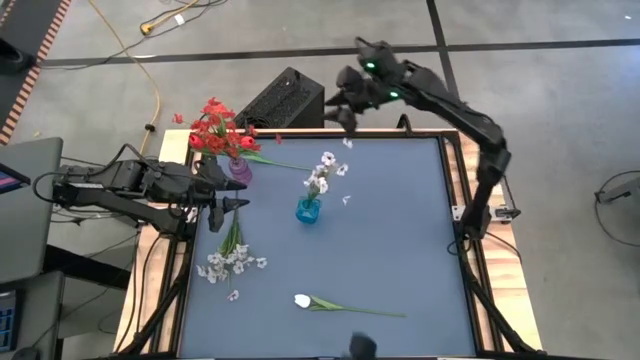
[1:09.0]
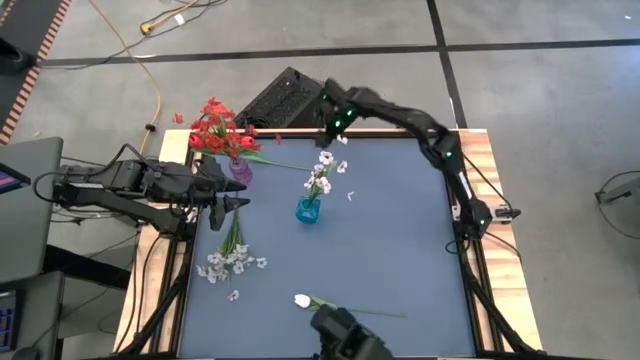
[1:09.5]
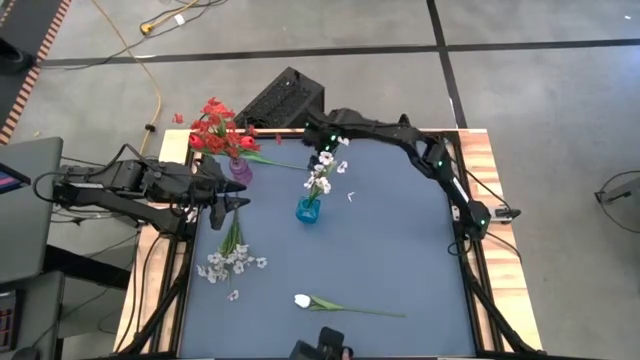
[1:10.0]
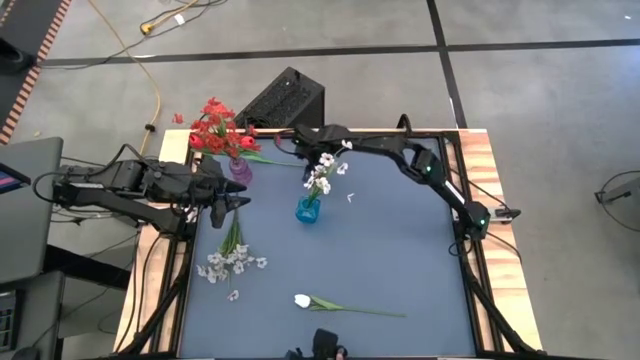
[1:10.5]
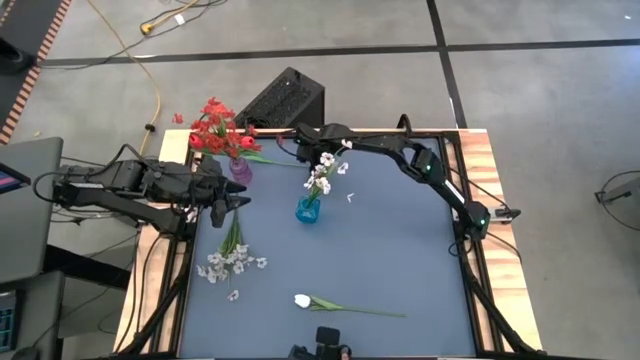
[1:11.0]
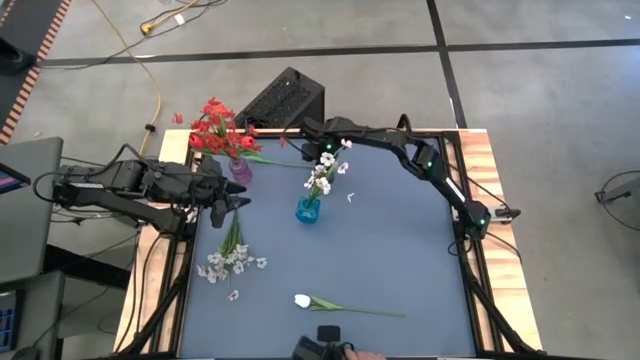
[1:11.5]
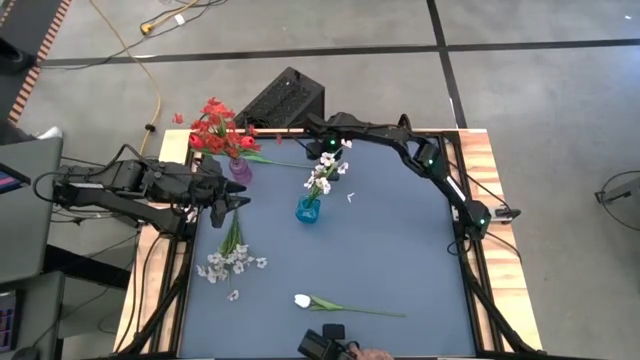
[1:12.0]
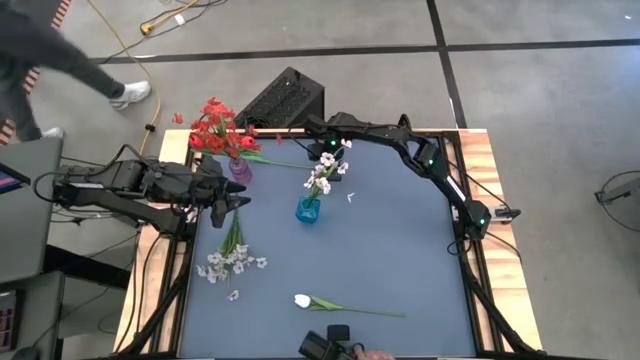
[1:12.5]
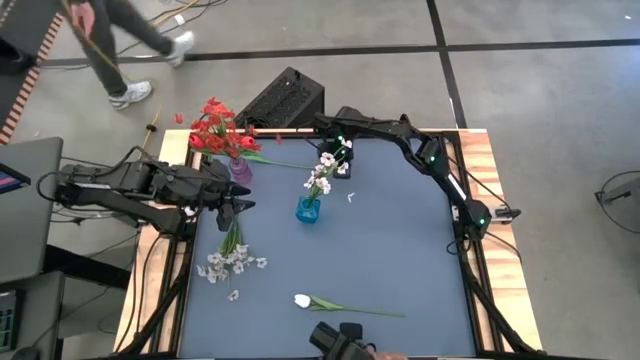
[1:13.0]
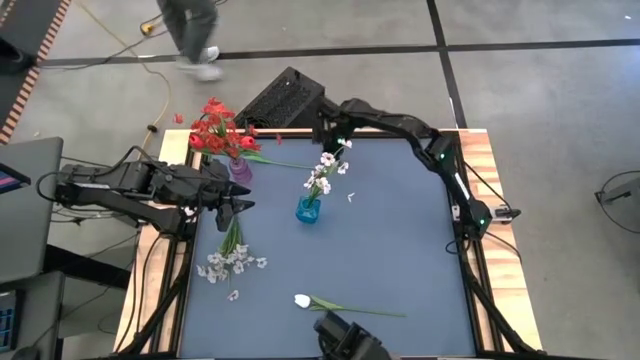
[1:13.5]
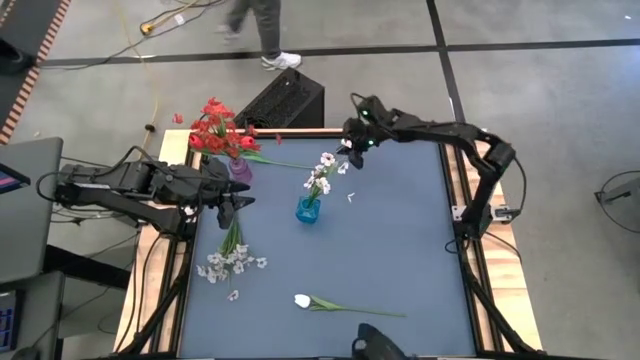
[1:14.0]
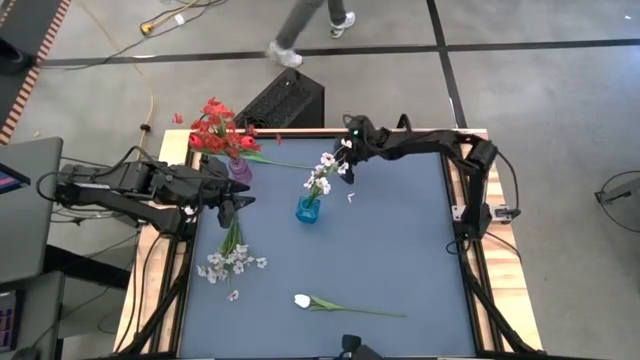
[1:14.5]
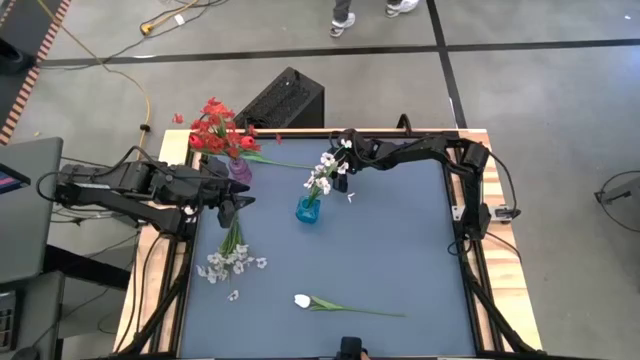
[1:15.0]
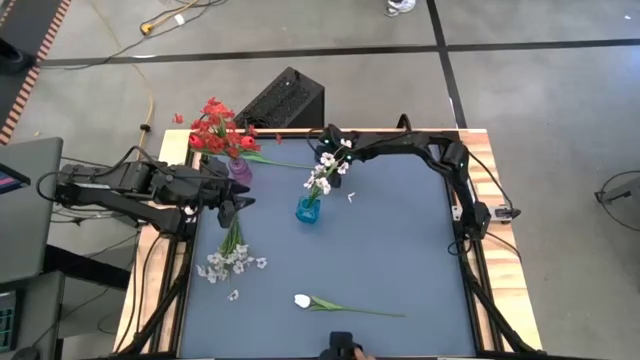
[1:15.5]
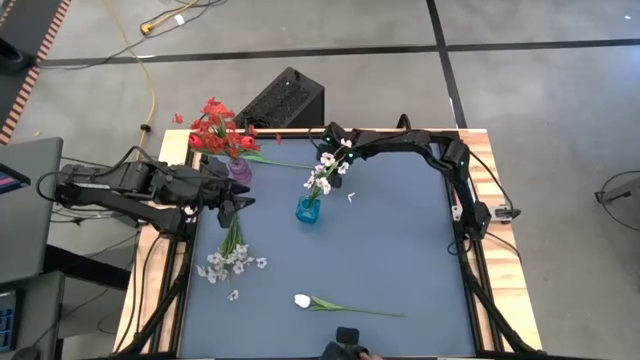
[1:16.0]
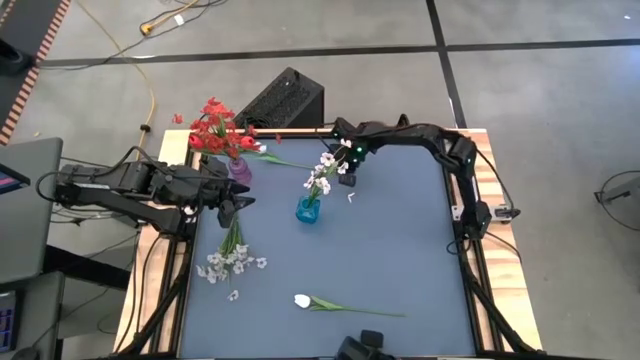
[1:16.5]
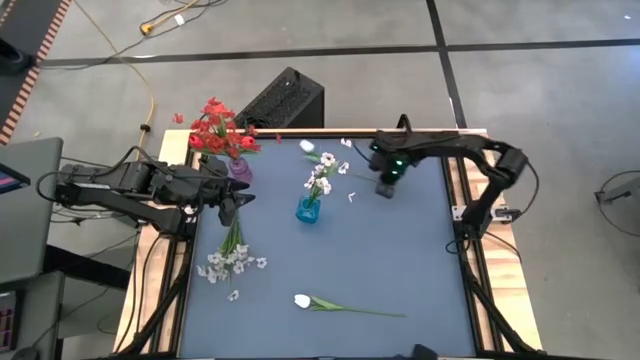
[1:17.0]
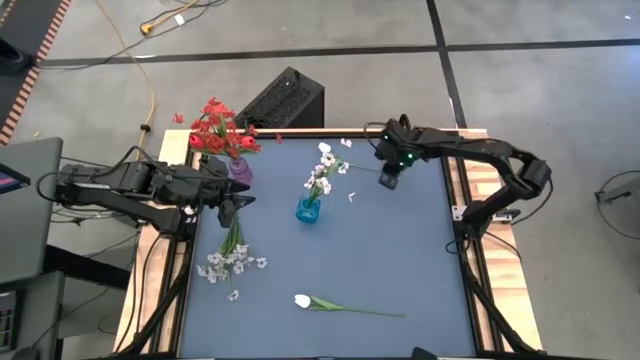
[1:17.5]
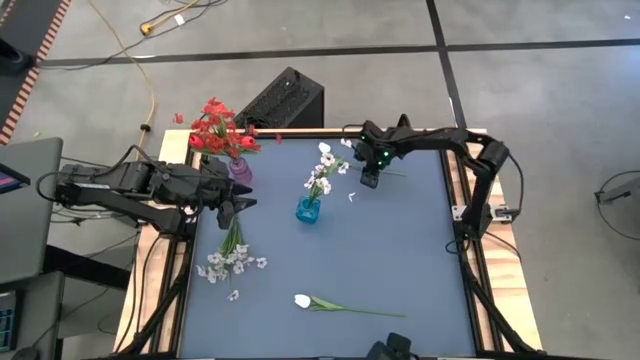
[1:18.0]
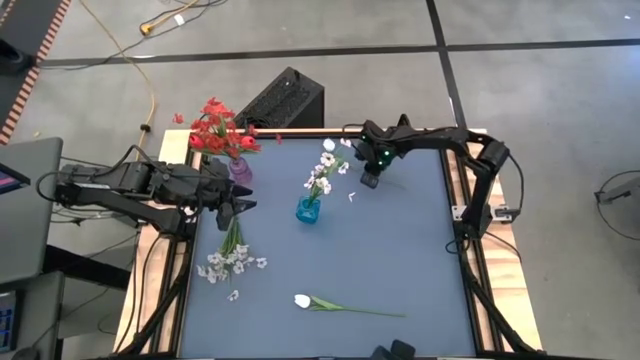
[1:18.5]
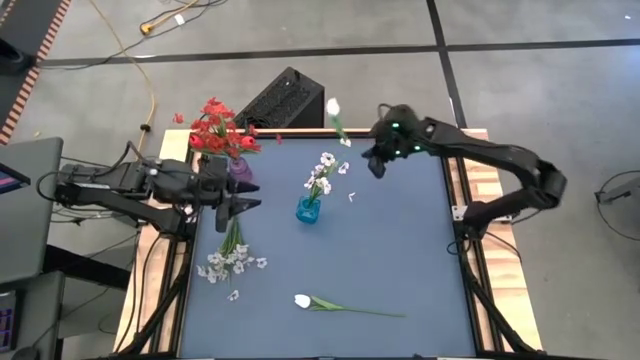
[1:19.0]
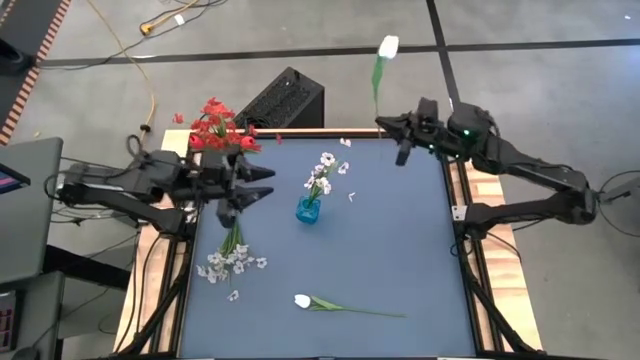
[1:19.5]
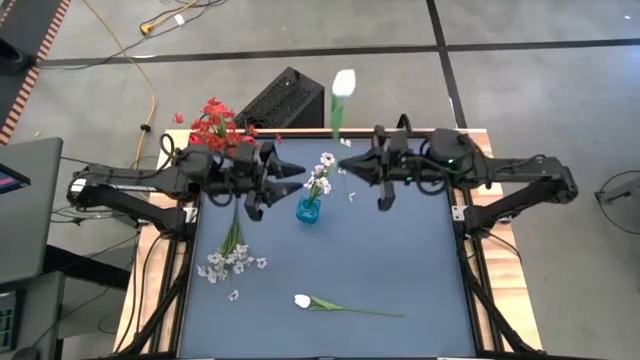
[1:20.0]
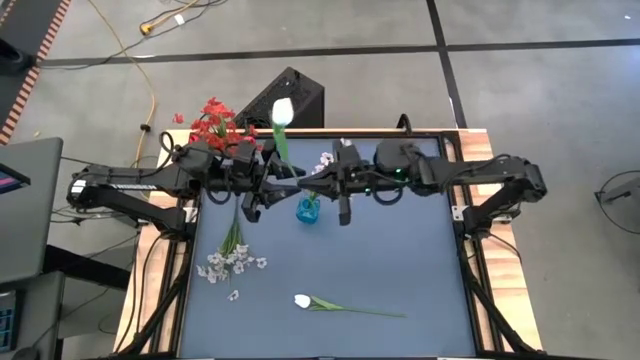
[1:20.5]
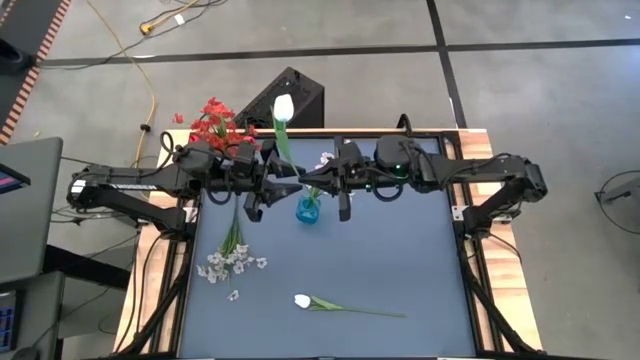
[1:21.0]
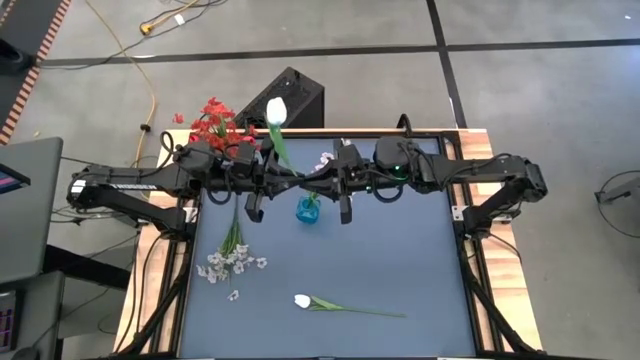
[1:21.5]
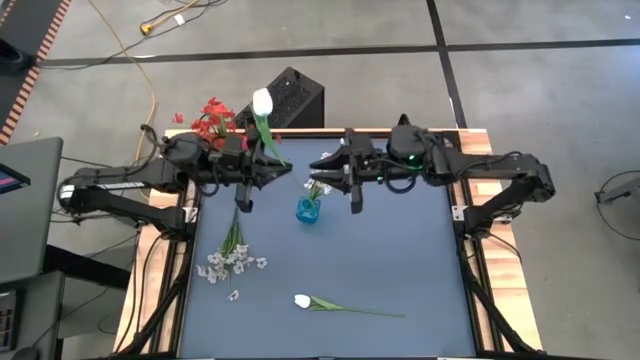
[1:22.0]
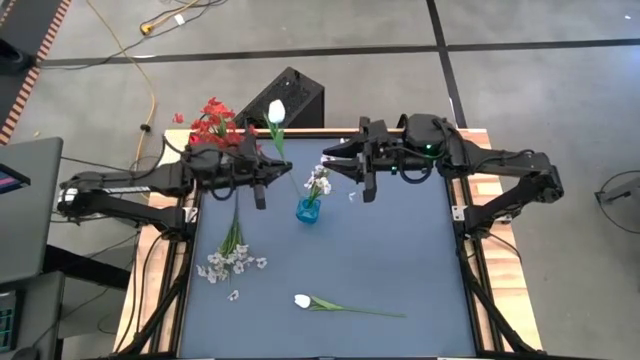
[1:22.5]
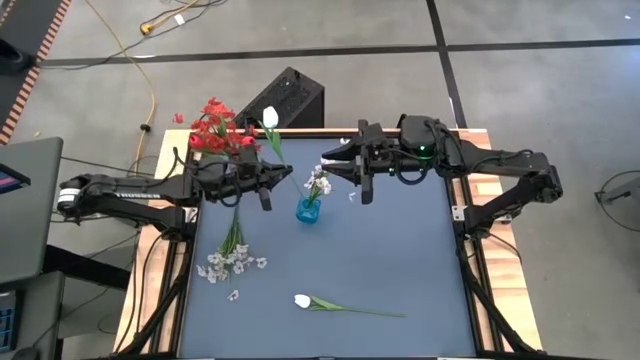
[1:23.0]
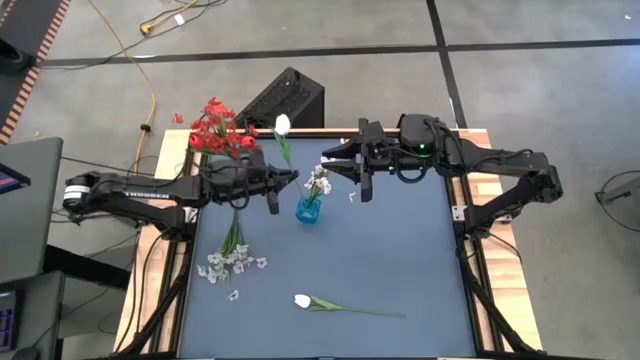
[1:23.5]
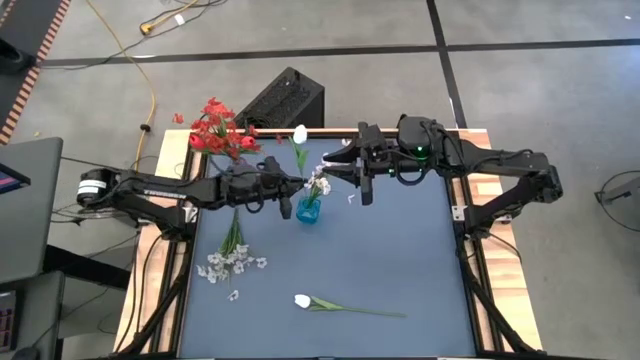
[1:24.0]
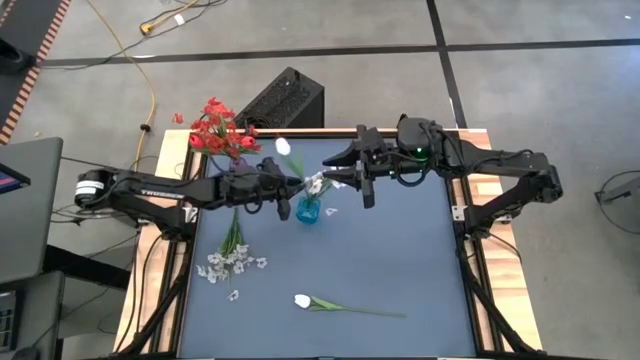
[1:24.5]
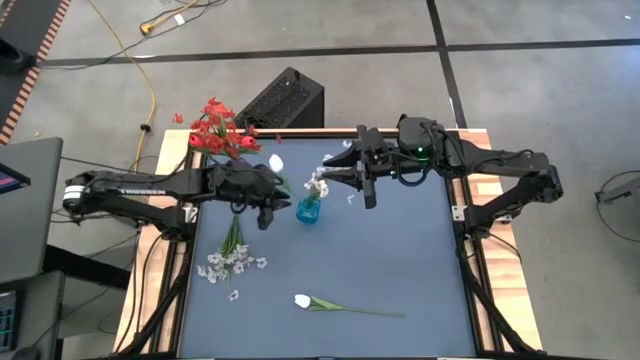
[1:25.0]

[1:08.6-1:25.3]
Task: Sort flowers into vase by color
Put the top white tulip into the blue vase

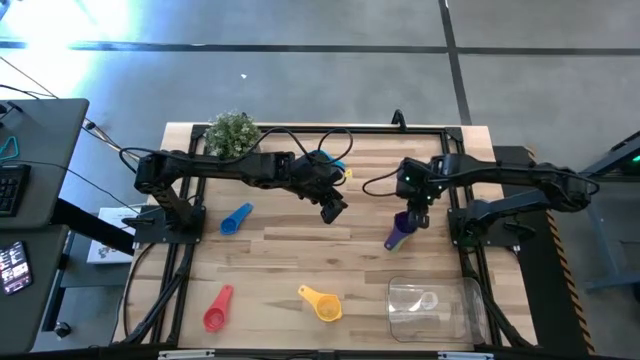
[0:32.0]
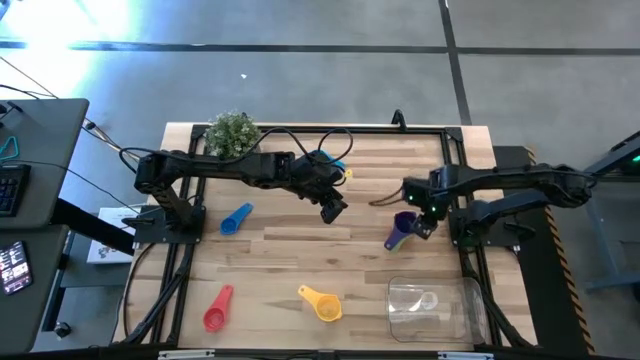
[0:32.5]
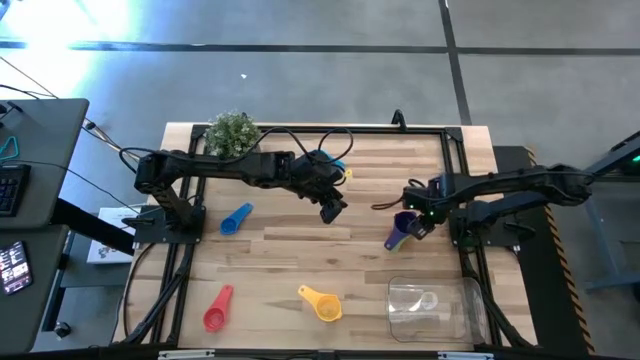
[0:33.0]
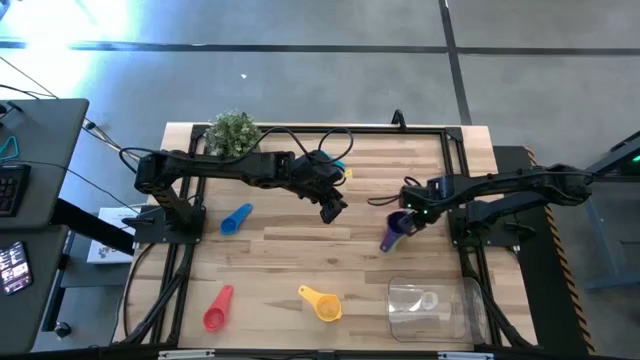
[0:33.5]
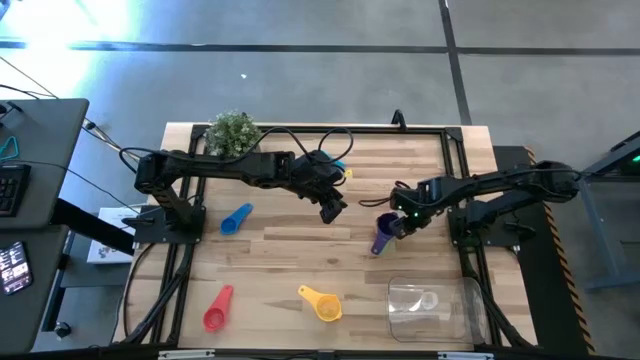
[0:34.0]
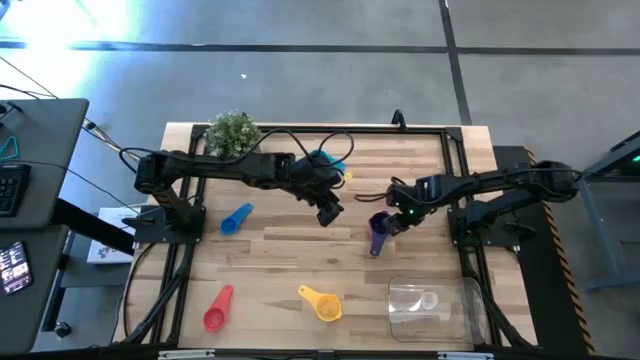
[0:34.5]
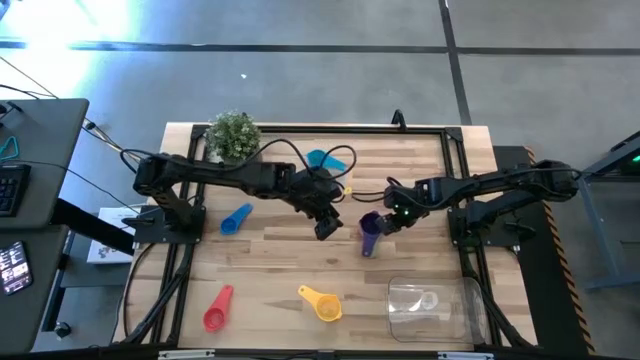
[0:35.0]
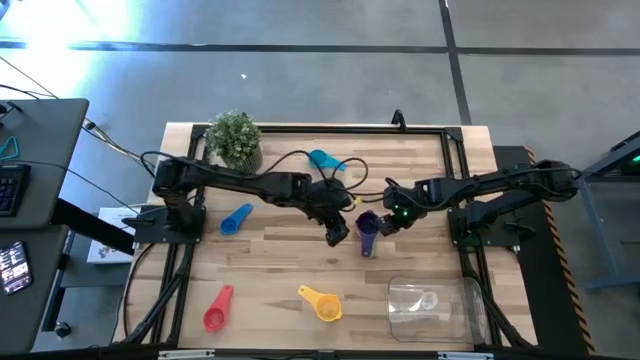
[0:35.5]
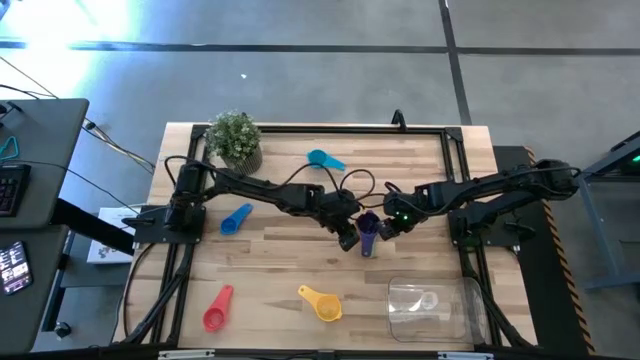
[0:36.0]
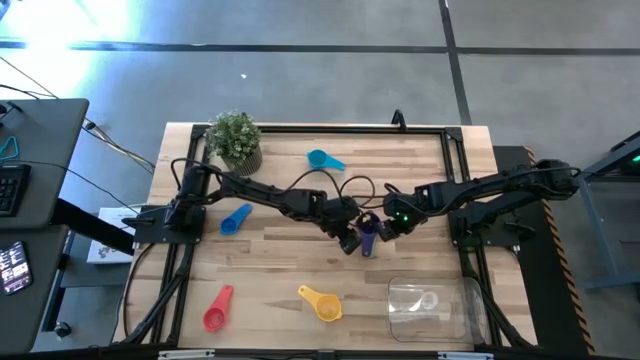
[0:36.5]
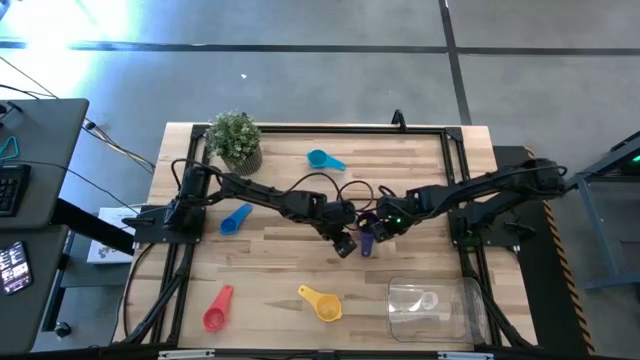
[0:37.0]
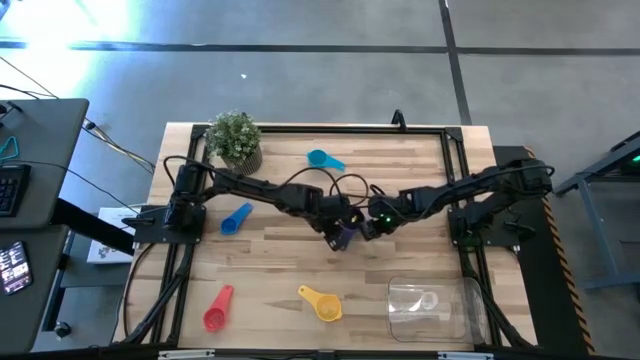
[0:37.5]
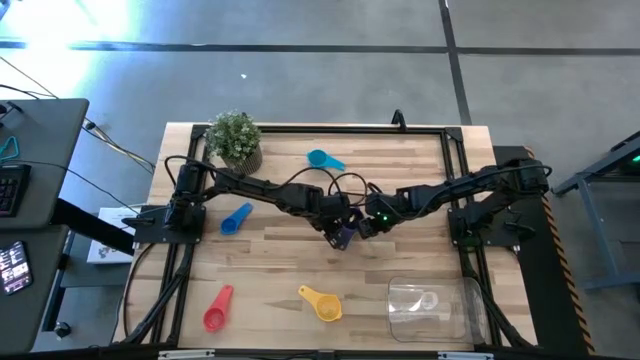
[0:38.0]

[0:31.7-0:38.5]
Task: Nest measuring cups in basket
Adjust the stacked measuring cups
